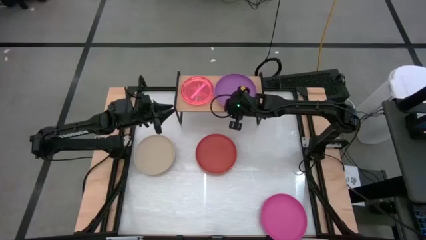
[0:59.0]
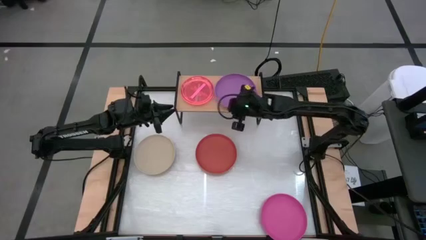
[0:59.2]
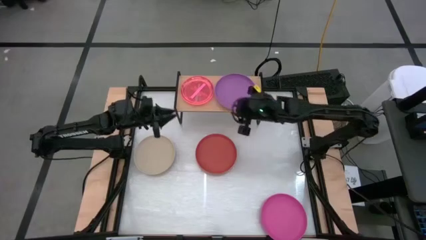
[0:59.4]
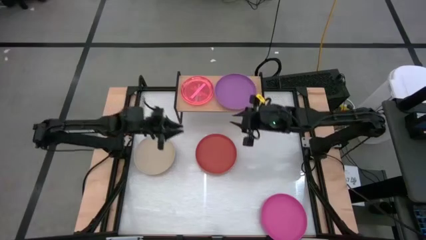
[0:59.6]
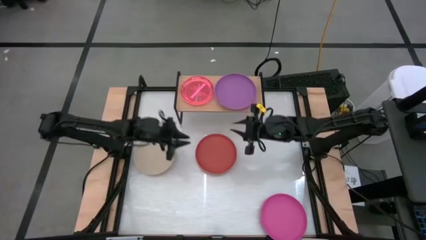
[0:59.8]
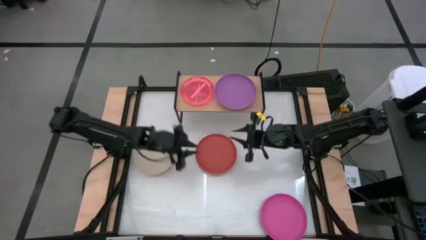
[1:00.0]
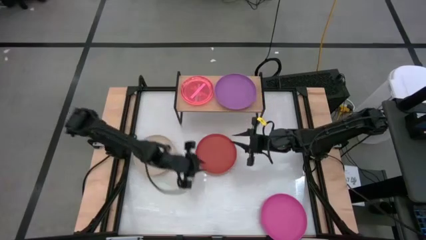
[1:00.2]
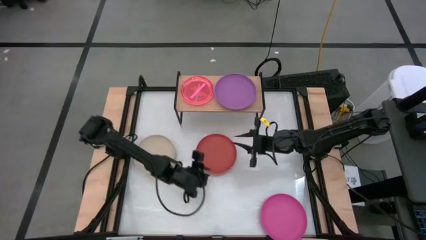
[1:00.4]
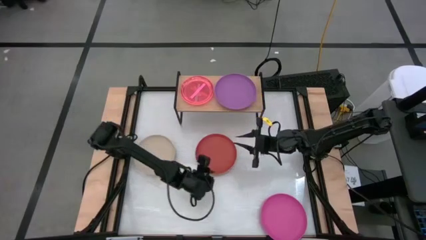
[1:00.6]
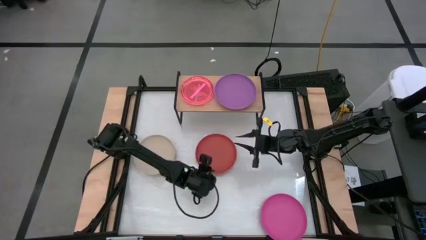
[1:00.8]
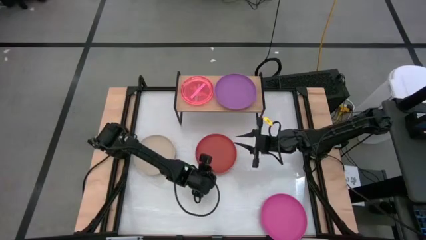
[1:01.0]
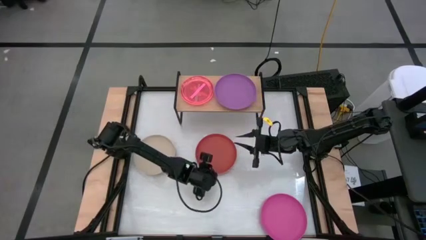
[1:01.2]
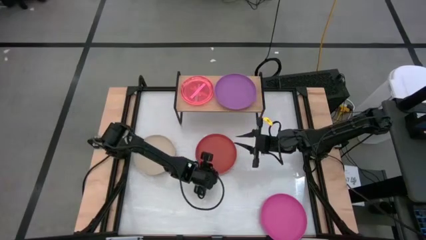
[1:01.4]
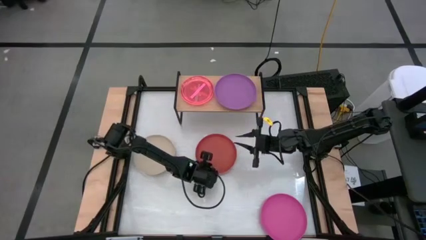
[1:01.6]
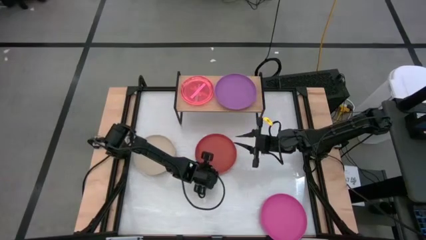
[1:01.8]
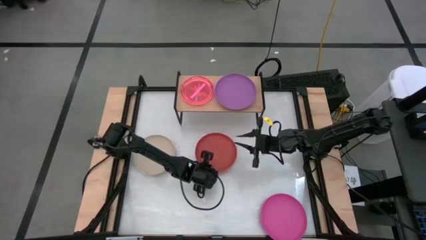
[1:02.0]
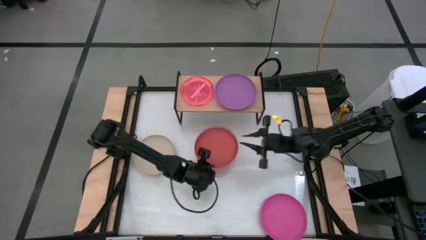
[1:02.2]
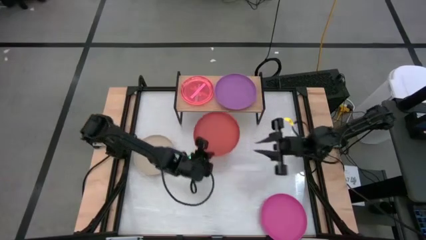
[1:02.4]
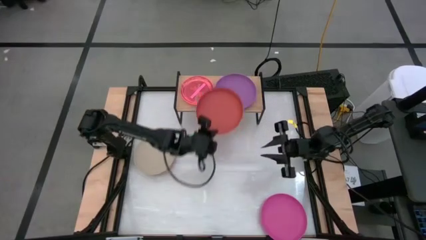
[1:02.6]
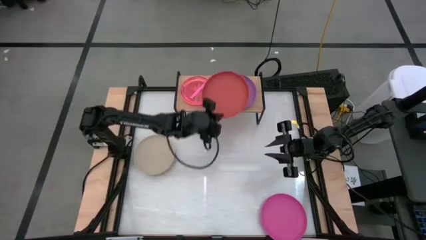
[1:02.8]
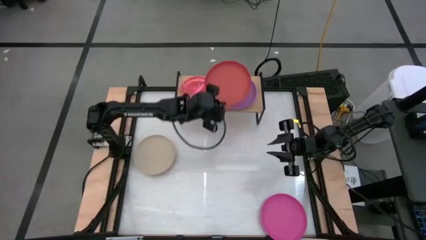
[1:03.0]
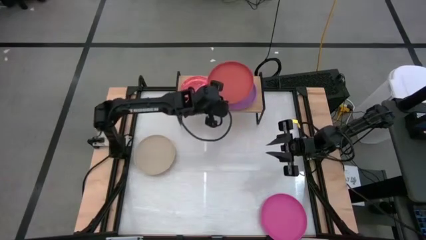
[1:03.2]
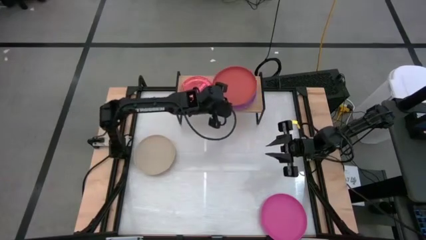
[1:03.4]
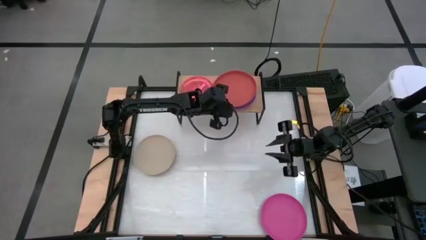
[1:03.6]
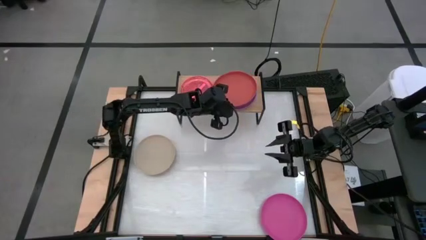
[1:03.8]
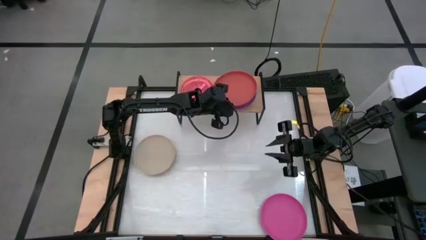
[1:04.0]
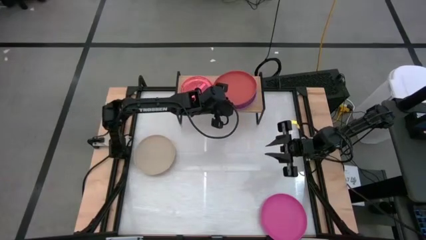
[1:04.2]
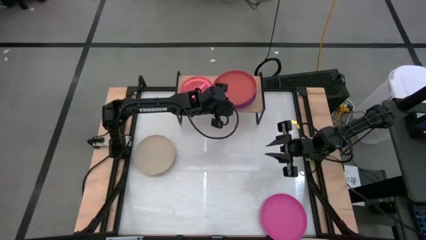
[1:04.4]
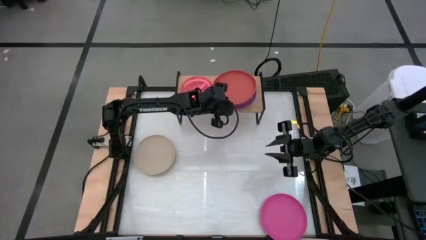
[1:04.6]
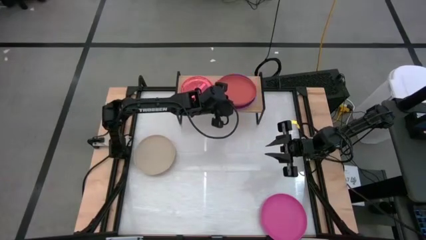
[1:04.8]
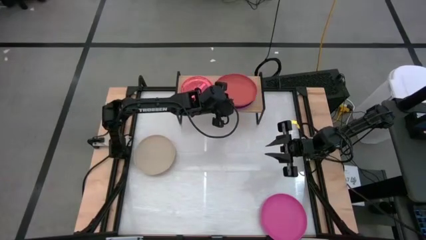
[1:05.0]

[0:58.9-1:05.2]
Task: Place and stack plates onto a shelf
Stack the big orange plate on top of the big purple plate on the shelf

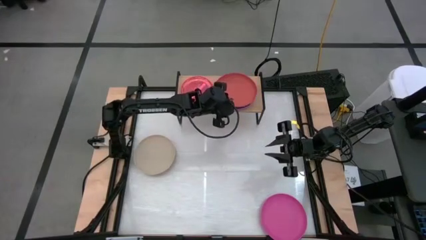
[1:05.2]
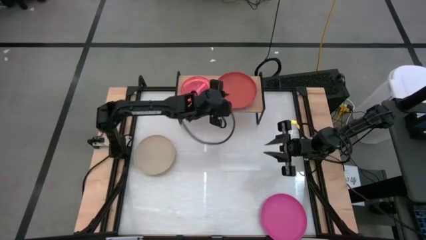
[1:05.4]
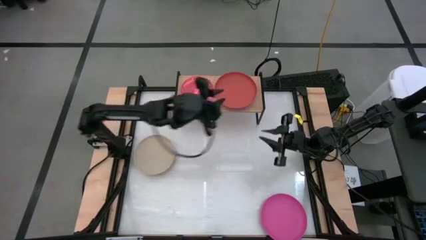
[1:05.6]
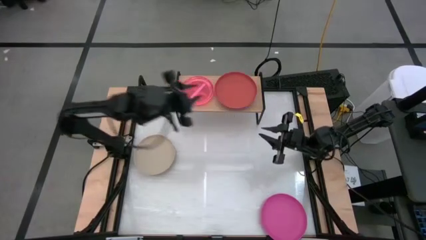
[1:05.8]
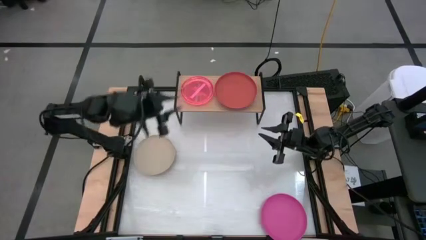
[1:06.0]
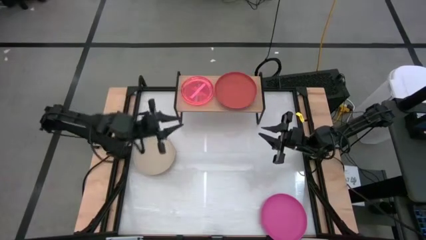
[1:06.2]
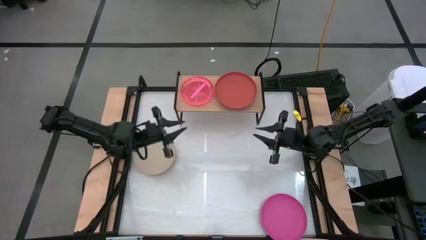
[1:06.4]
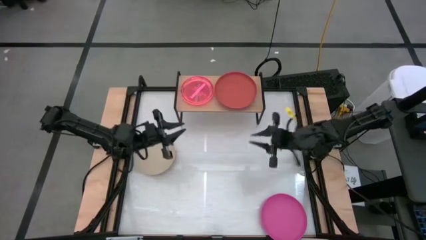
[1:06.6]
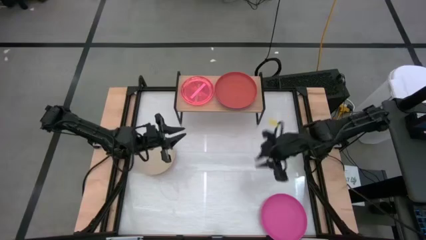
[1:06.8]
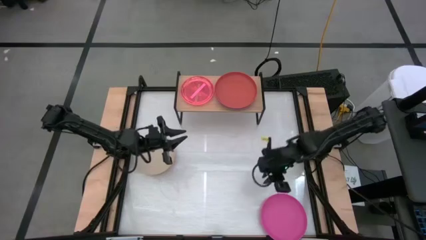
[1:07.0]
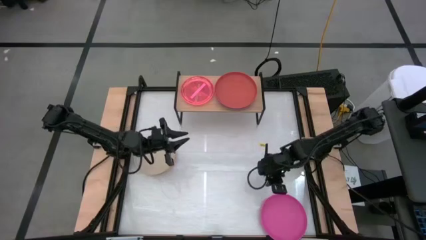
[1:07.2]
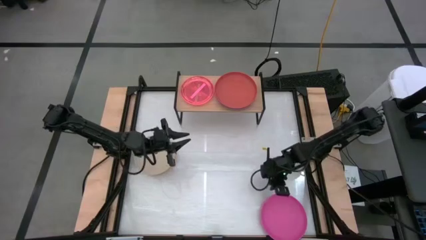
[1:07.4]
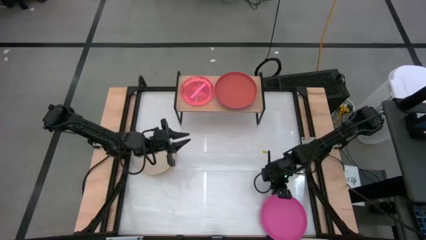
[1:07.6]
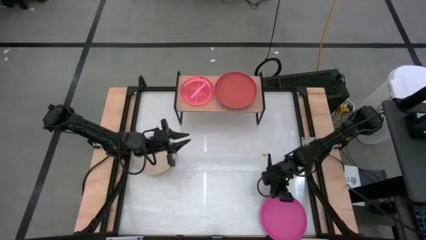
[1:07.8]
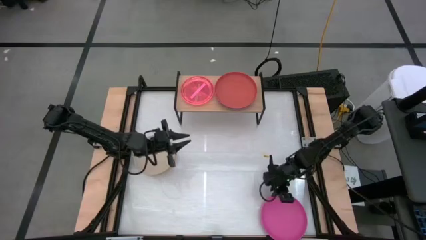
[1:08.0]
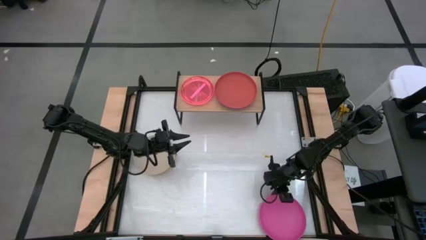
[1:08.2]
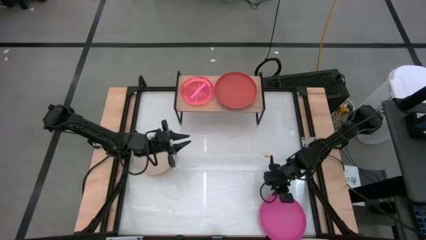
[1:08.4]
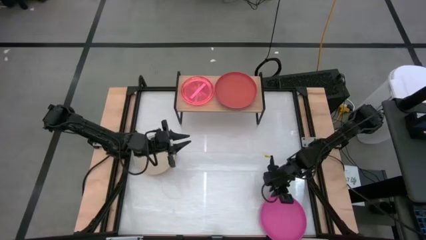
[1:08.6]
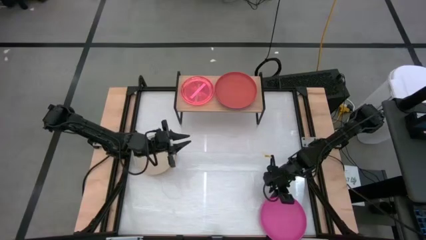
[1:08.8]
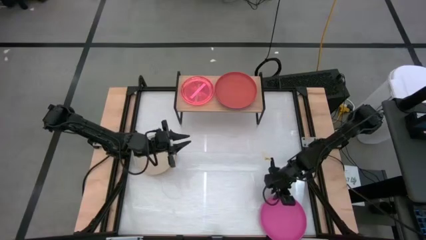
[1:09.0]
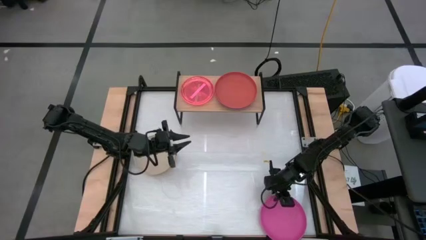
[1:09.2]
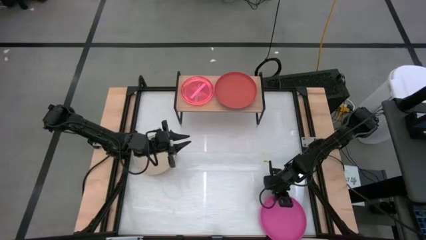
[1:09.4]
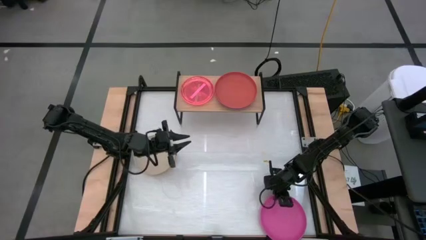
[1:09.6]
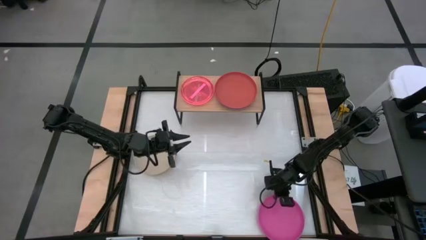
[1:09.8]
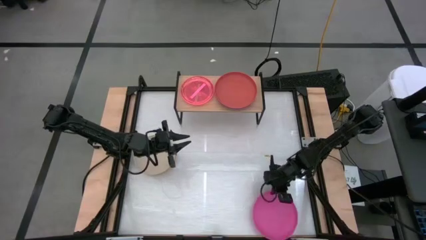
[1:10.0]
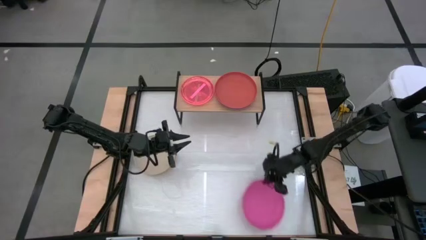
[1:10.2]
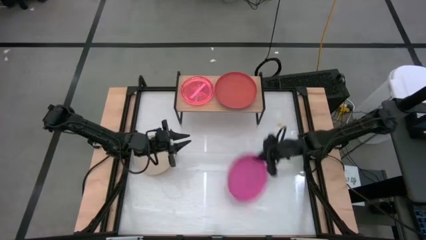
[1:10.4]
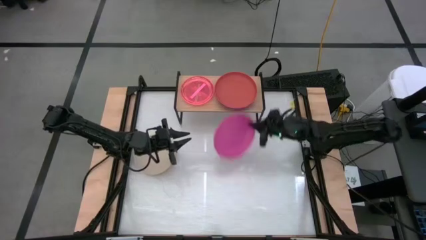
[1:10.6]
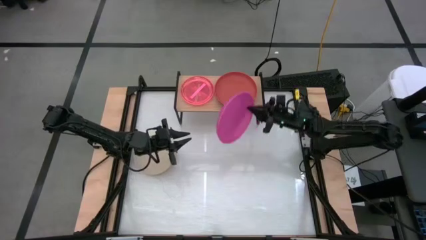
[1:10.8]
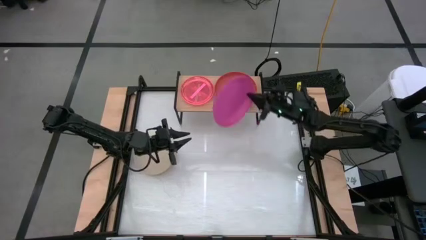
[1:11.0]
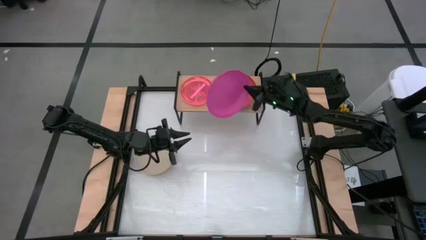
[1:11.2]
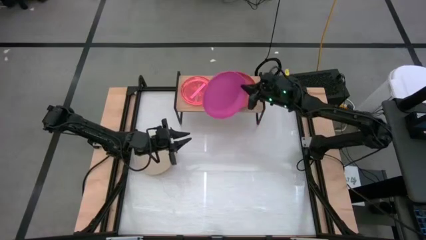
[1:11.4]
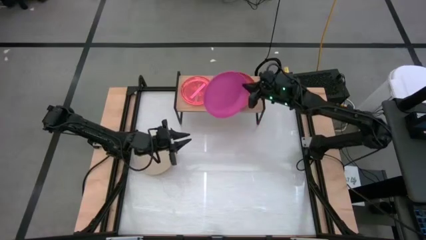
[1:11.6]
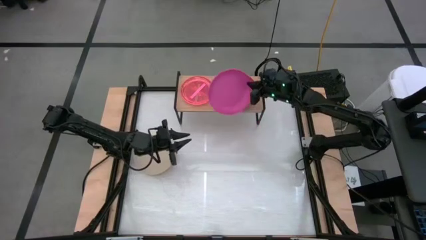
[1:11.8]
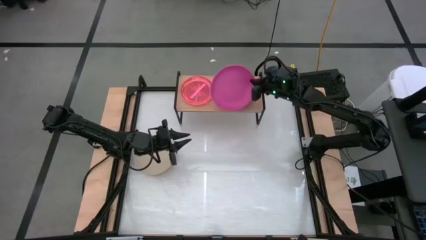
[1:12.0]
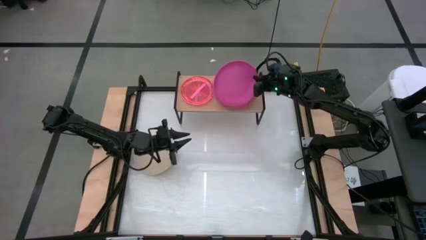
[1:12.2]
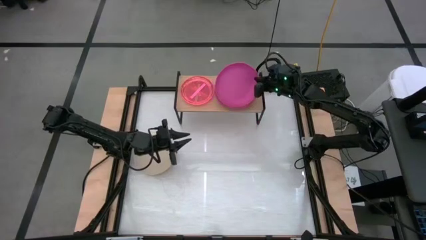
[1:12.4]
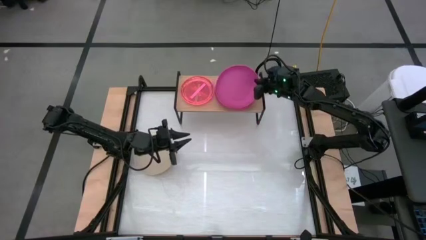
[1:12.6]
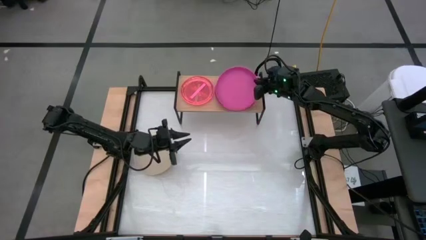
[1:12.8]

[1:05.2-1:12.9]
Stack the big pink plate on top of the big orange plate on the shelf

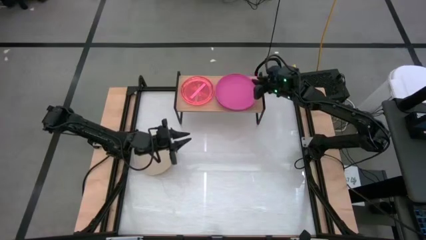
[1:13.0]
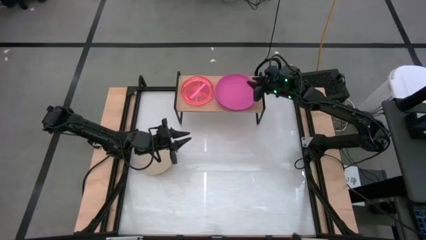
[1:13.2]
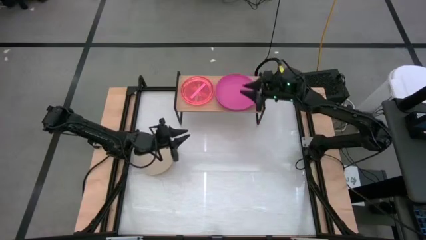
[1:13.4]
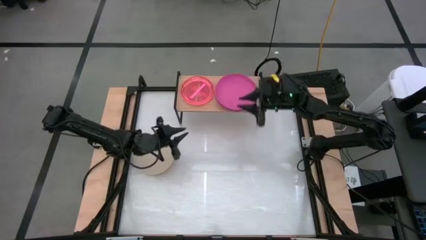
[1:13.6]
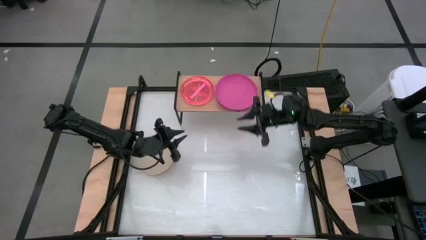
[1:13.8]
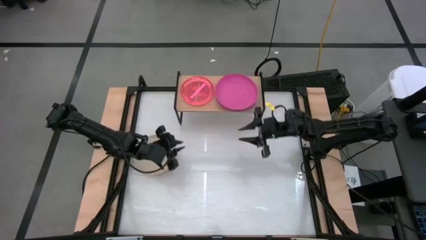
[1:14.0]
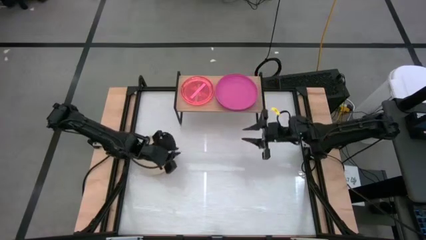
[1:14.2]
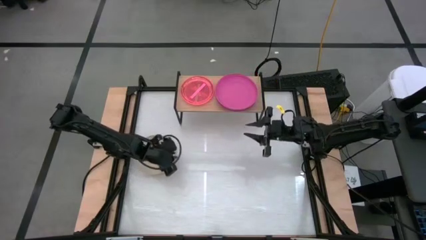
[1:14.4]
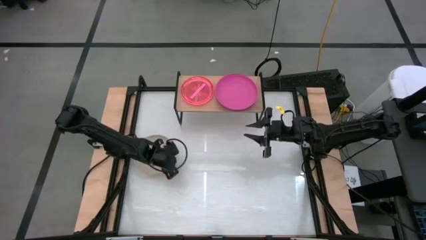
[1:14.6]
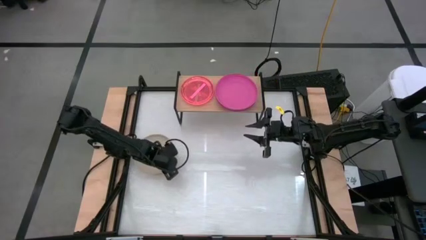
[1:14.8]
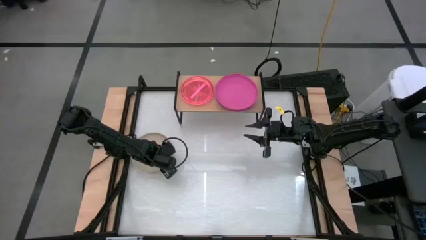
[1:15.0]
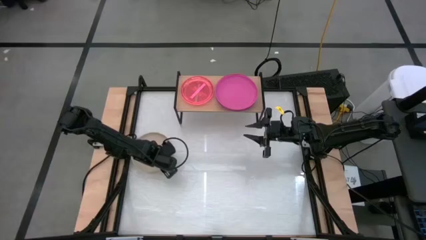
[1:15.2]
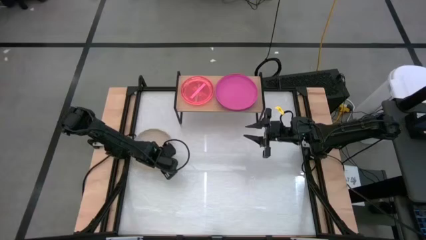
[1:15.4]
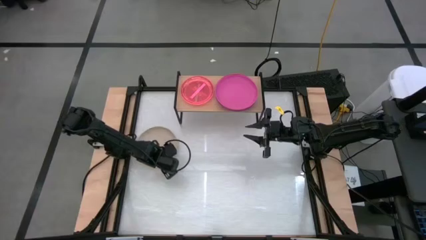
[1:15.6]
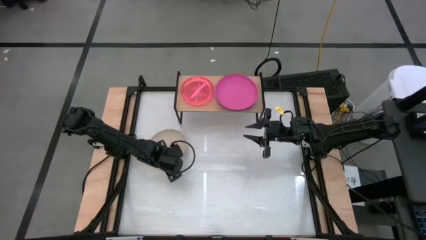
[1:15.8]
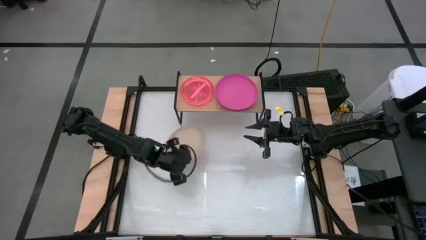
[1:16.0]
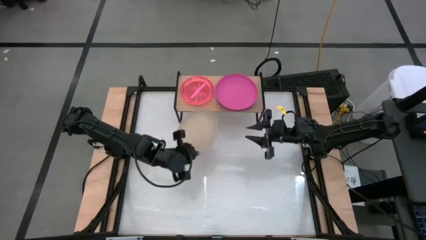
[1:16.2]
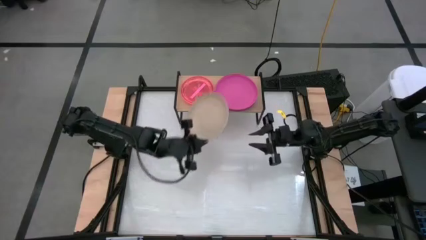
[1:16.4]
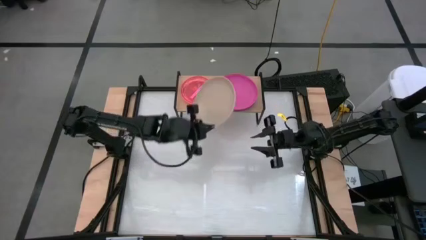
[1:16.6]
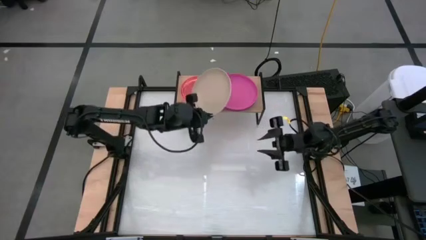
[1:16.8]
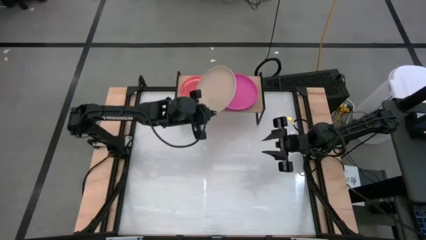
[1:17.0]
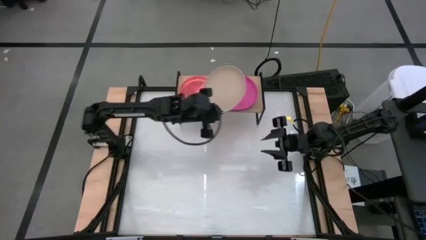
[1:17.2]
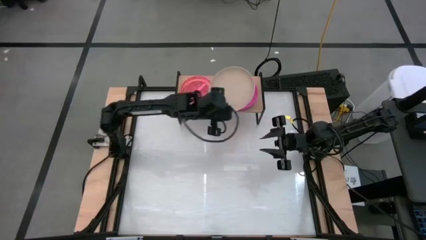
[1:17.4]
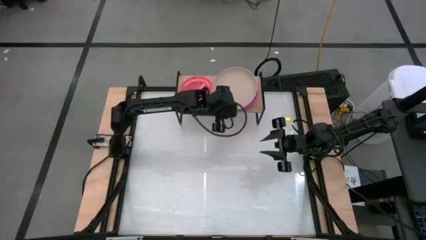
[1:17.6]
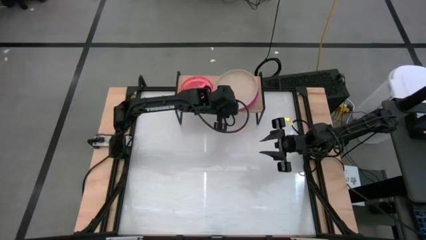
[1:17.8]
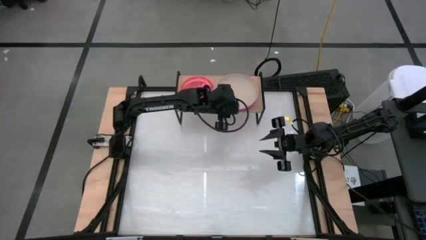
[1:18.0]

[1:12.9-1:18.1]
Stack the big white plate on top of the big pink plate on the shelf
